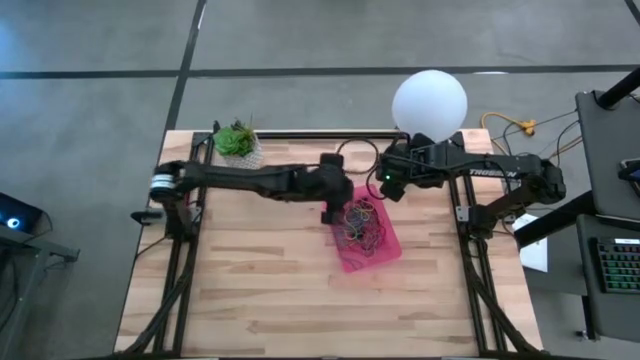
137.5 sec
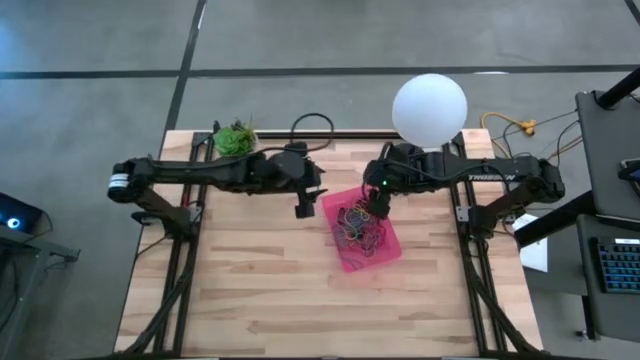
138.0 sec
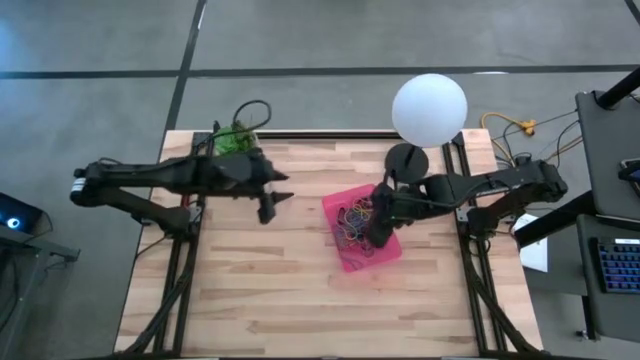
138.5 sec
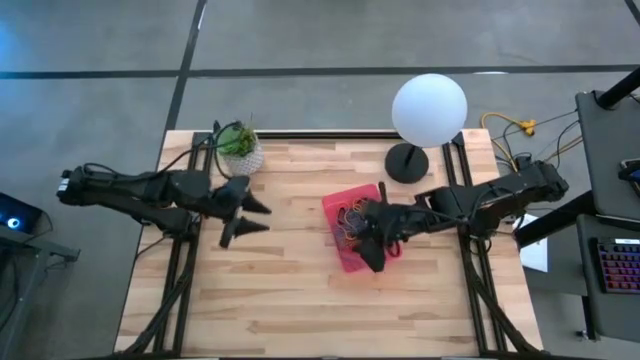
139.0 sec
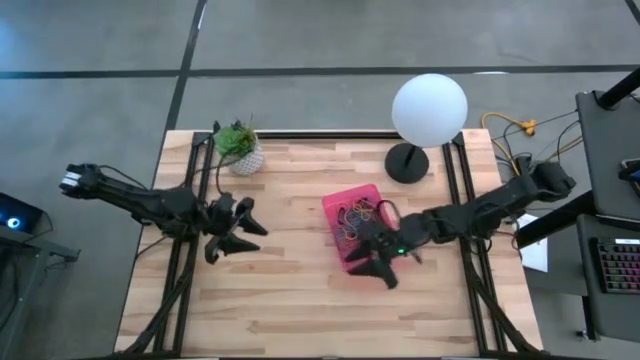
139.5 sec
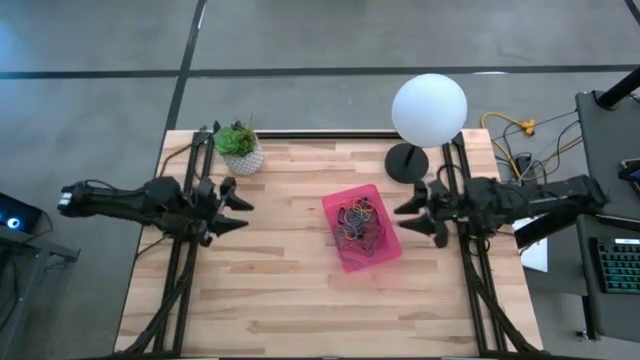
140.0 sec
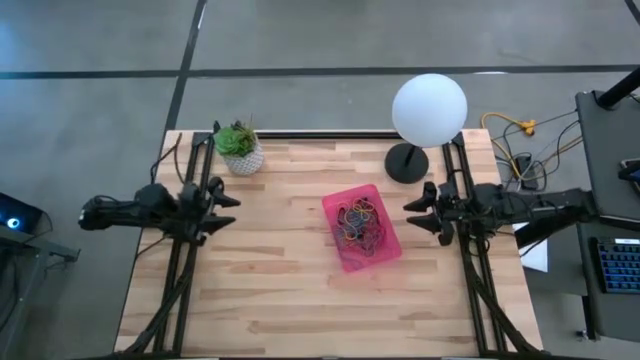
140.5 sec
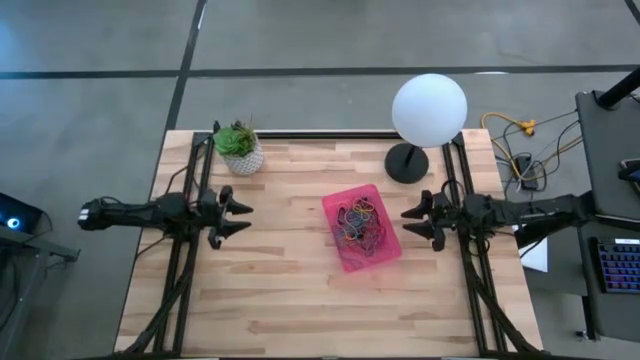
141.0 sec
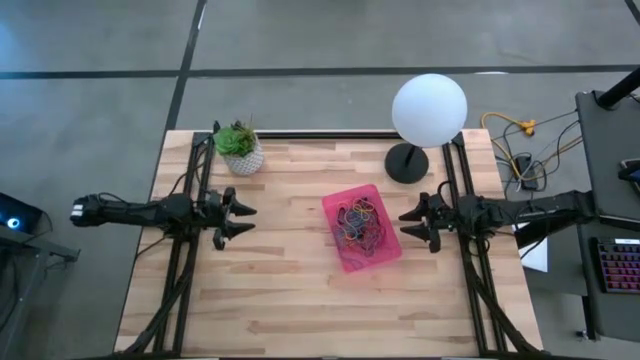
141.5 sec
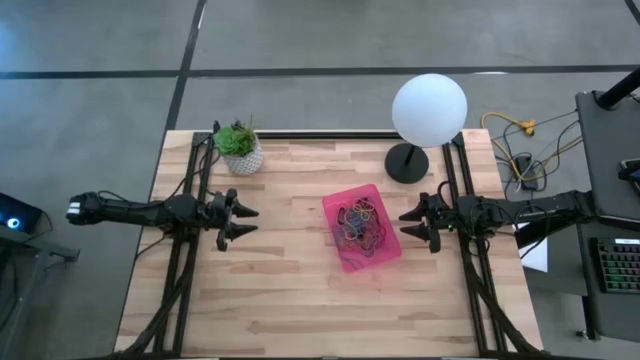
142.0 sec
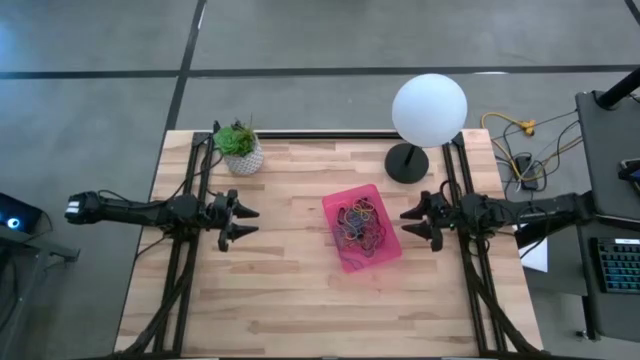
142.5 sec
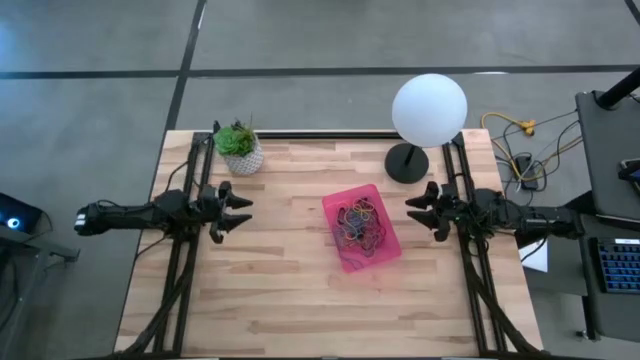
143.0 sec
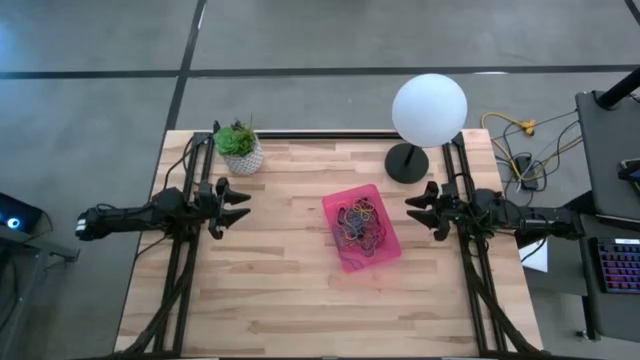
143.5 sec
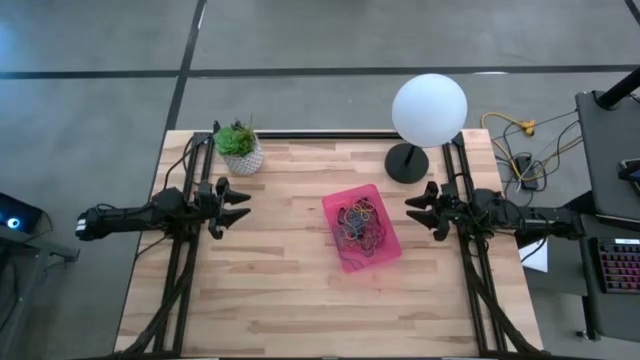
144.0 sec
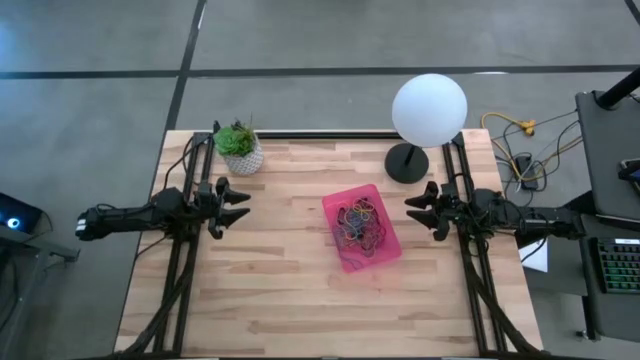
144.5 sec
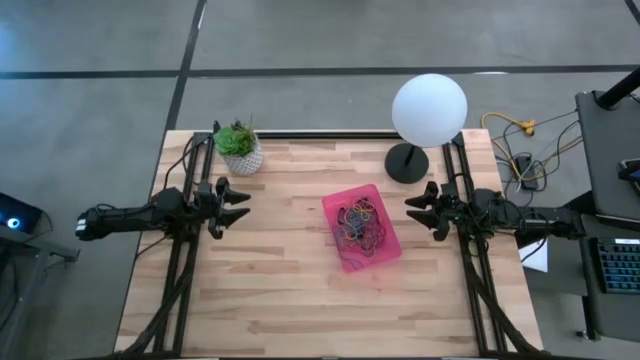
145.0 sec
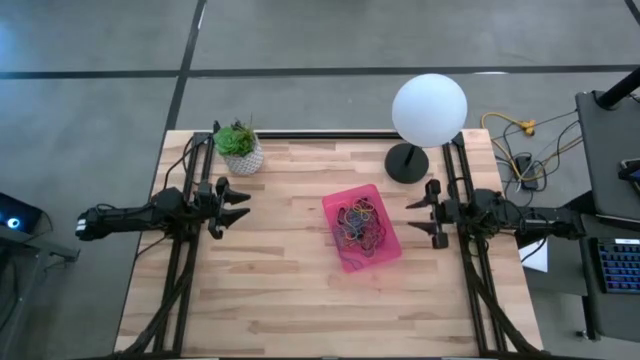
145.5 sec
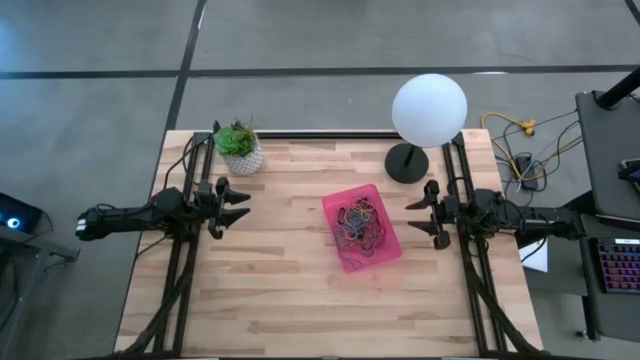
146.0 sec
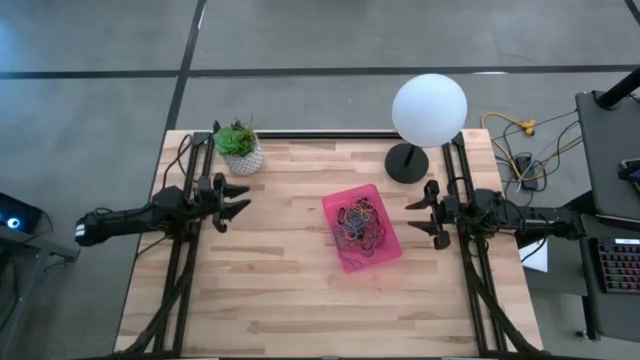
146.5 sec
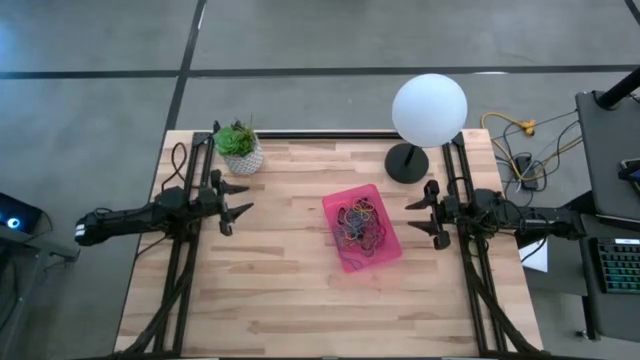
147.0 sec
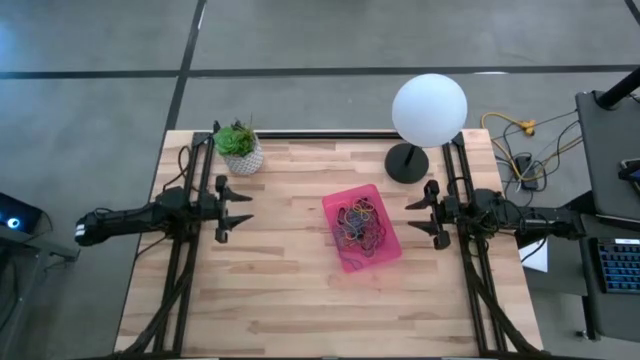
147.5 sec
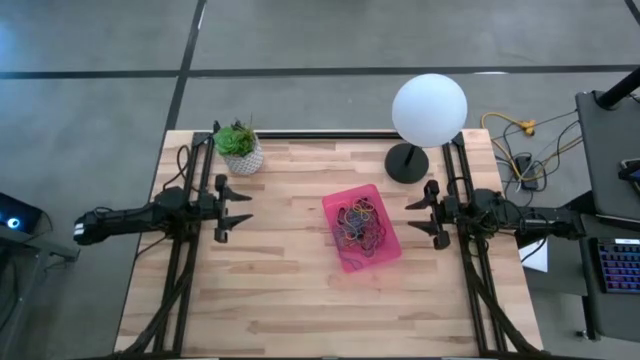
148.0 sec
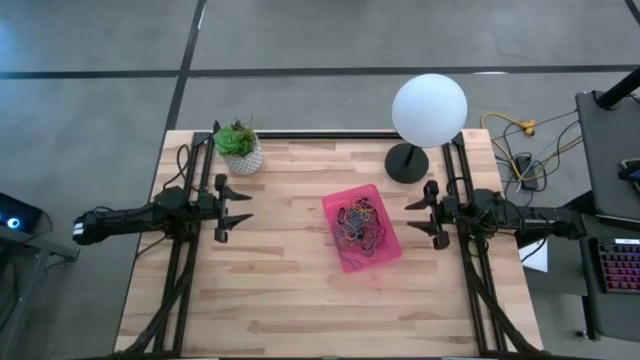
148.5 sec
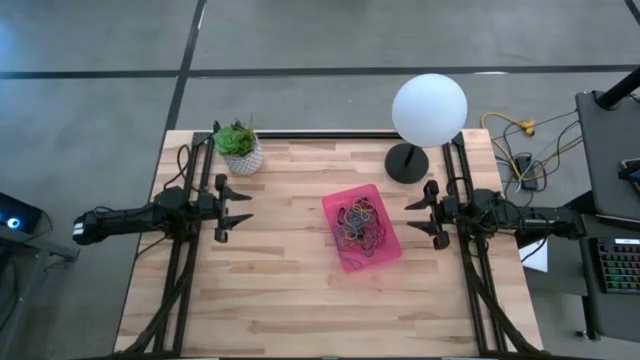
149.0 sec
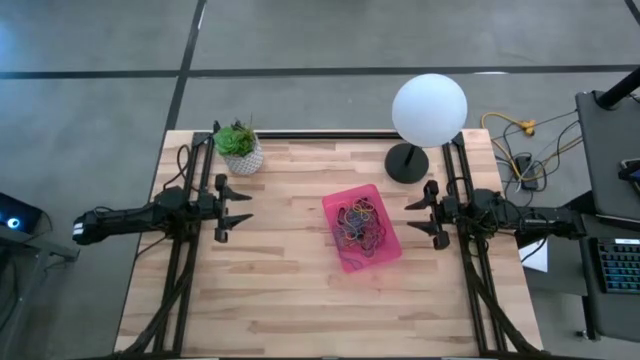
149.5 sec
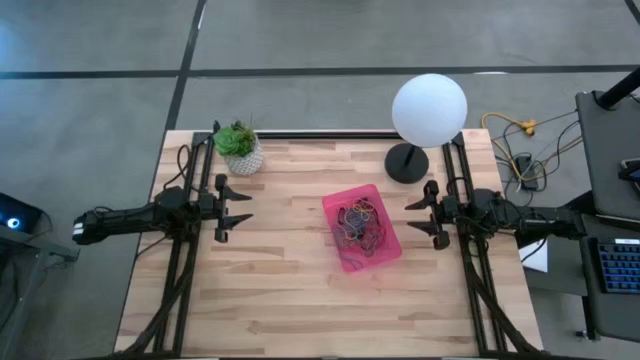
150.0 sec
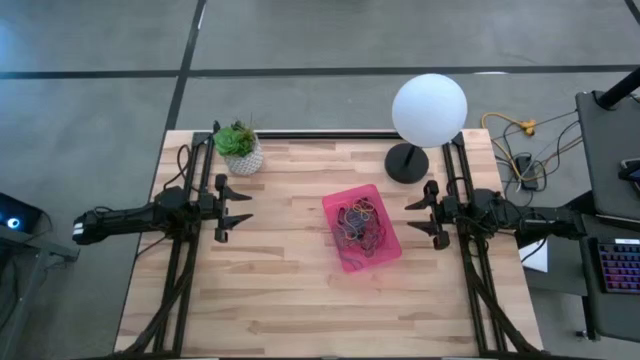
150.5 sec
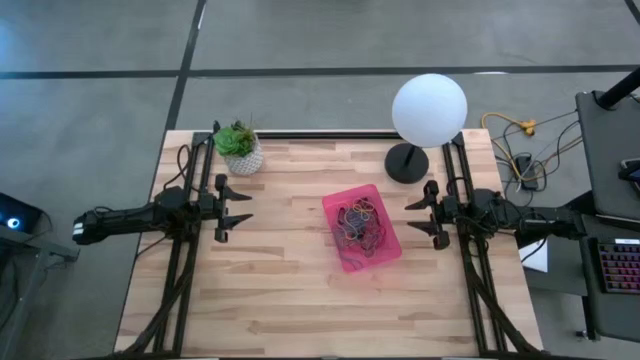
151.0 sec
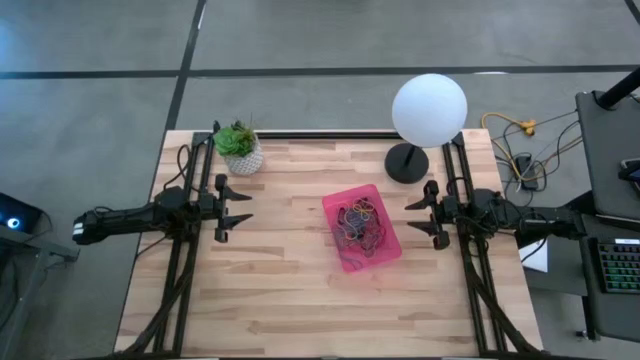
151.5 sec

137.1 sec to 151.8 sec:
Task: Pick and place rubber bands into bin
Return to home position

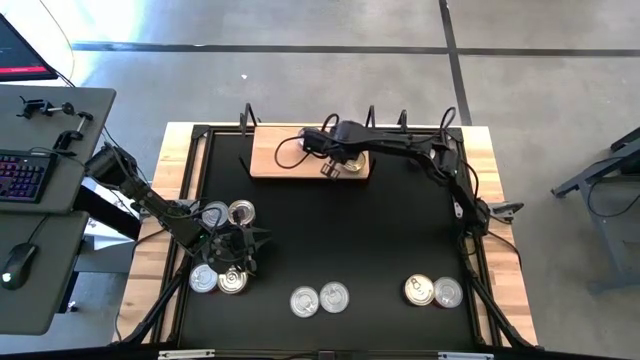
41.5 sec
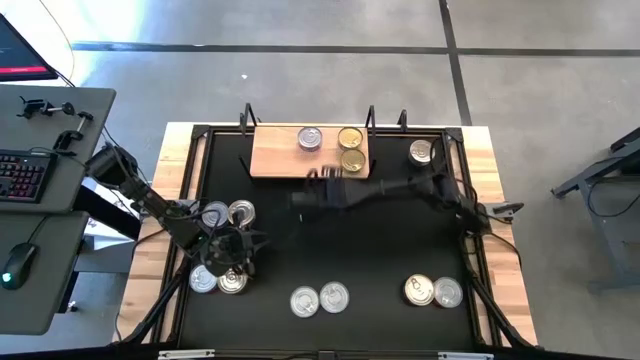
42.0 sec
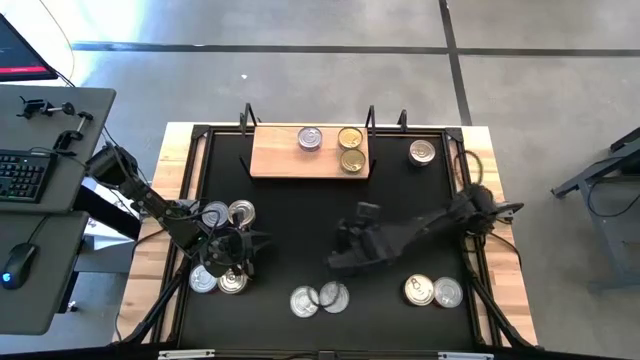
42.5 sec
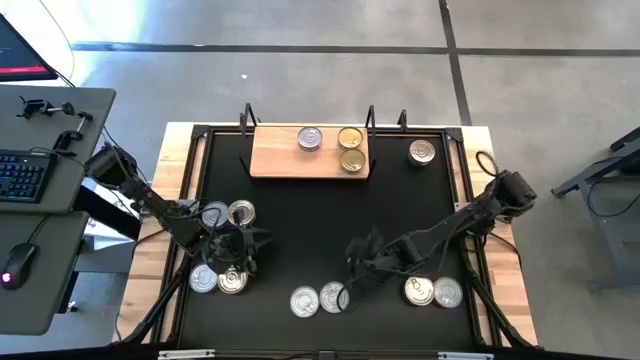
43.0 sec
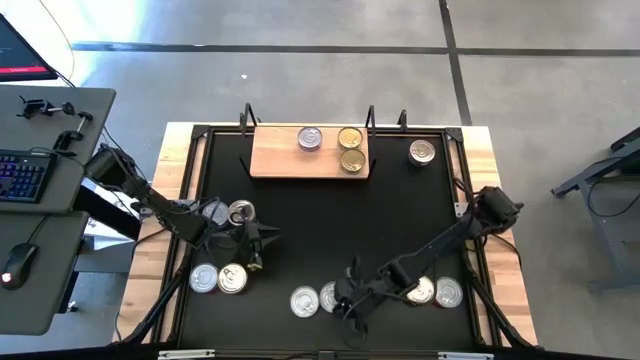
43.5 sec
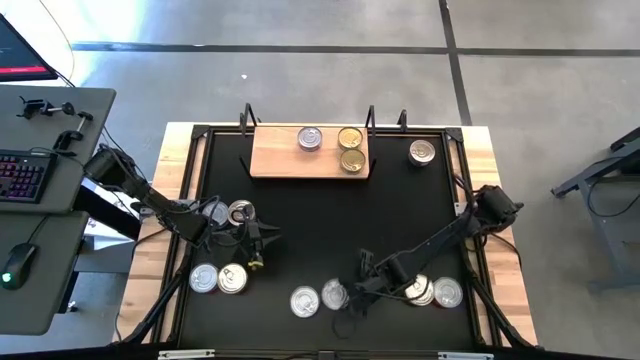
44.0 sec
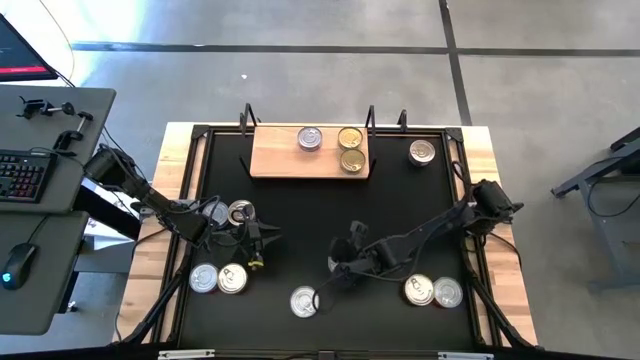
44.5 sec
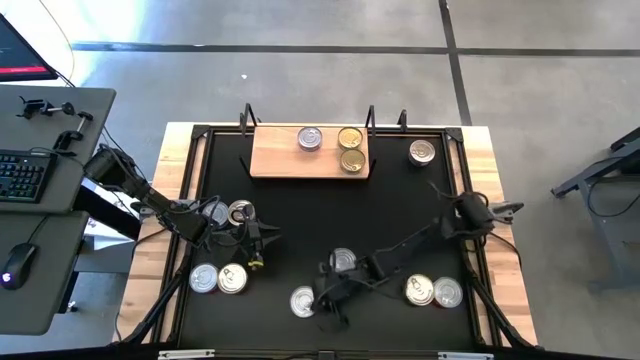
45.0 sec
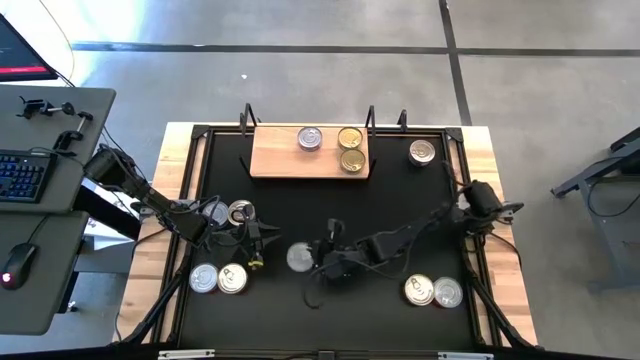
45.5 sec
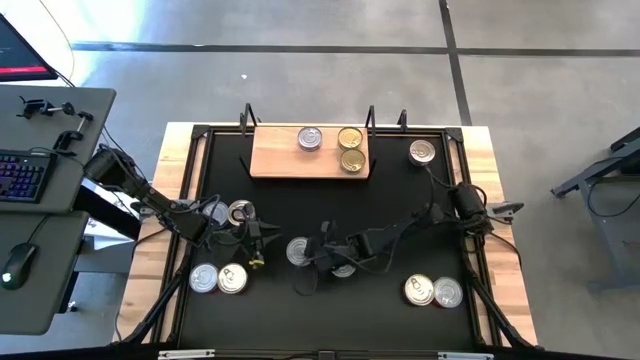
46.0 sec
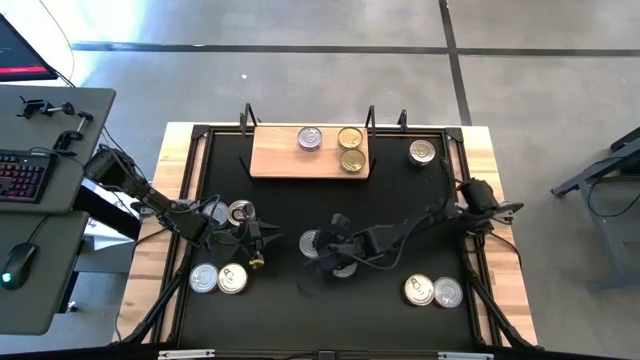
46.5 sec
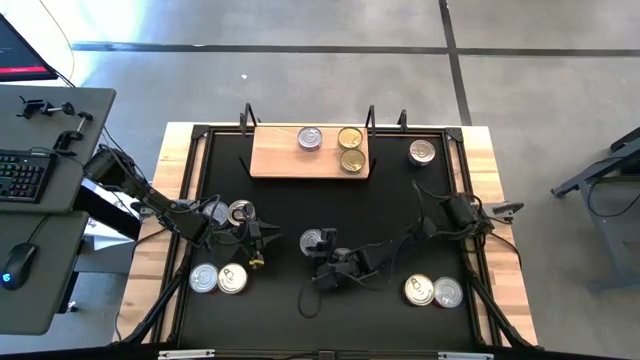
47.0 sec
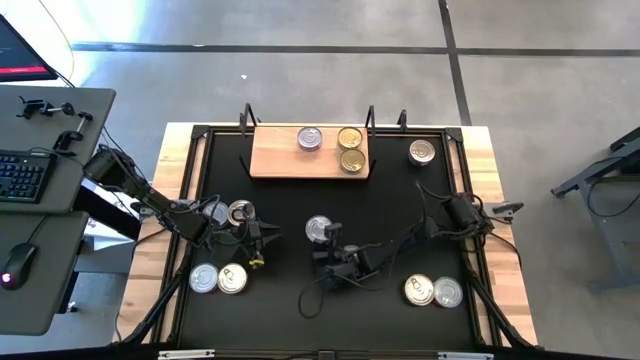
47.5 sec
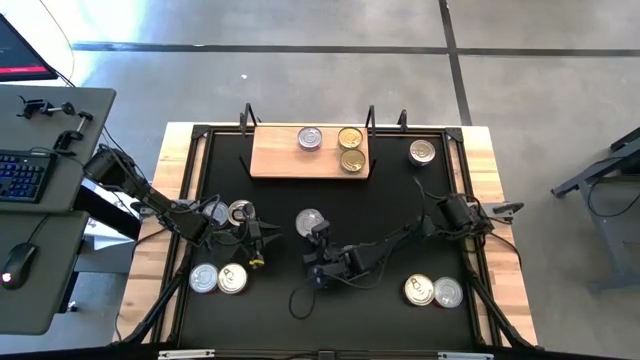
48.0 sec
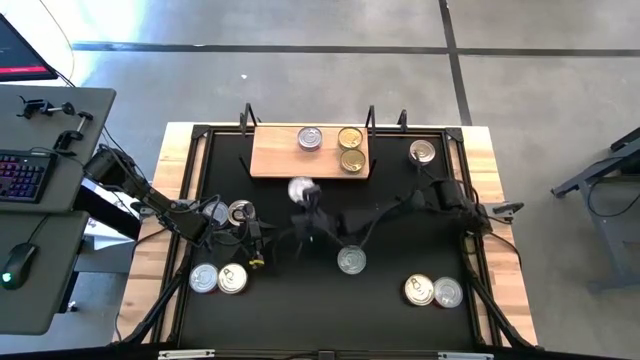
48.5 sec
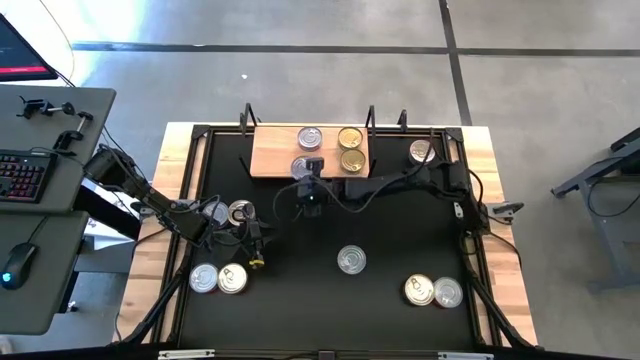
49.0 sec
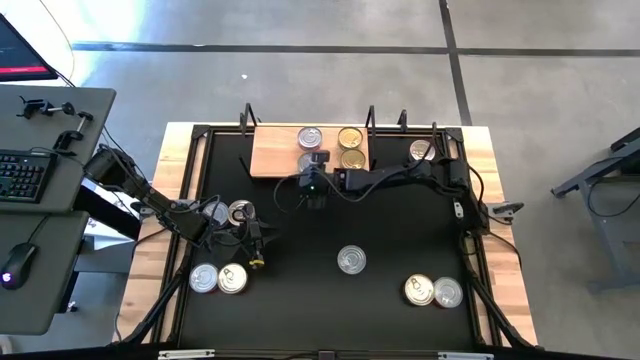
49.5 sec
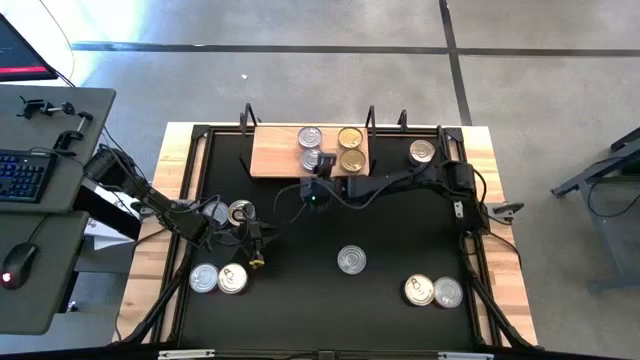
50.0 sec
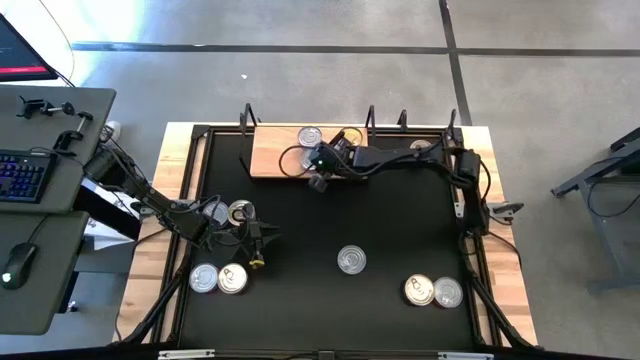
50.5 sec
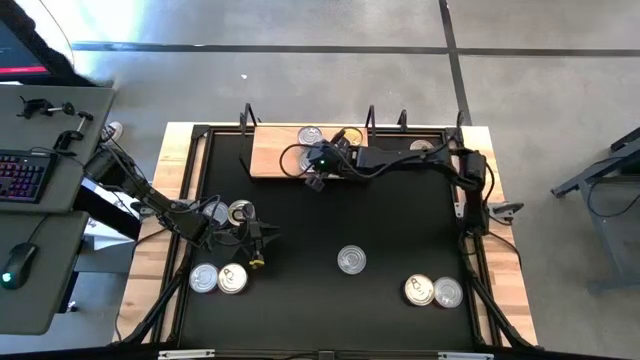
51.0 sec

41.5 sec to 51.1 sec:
Task: Stack canned seafood by type on shelf
Put the red tuna can on the shelf aligned with the other red tuna can
